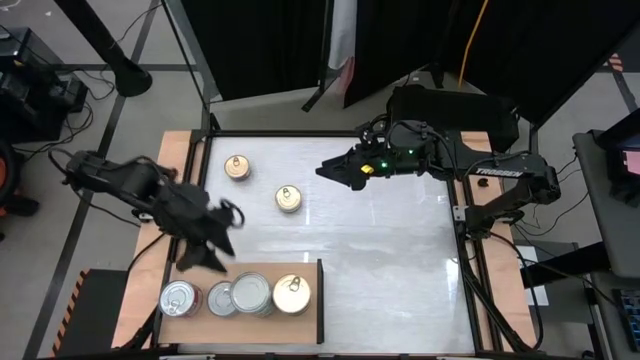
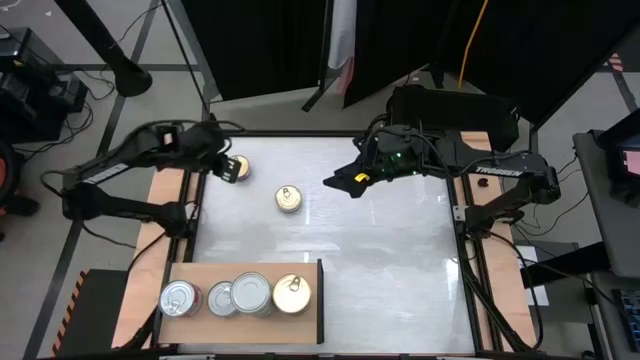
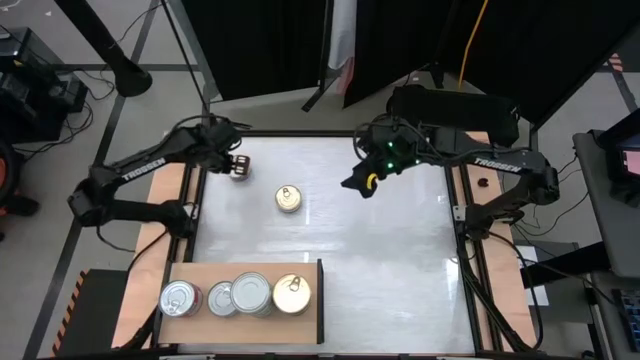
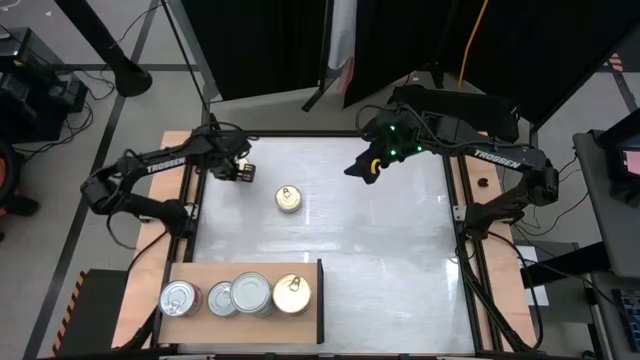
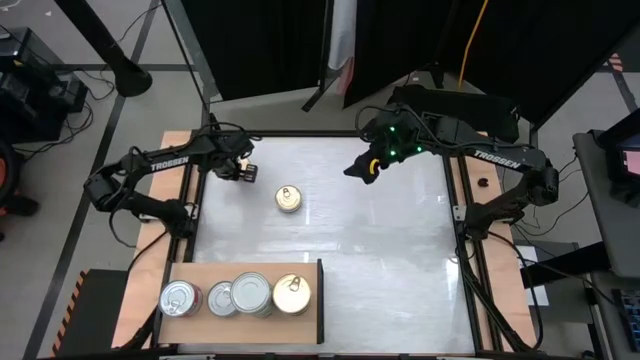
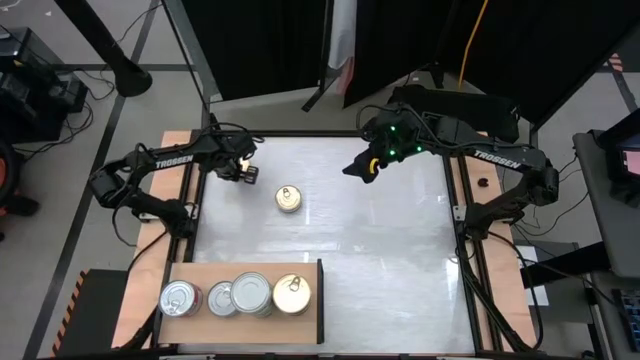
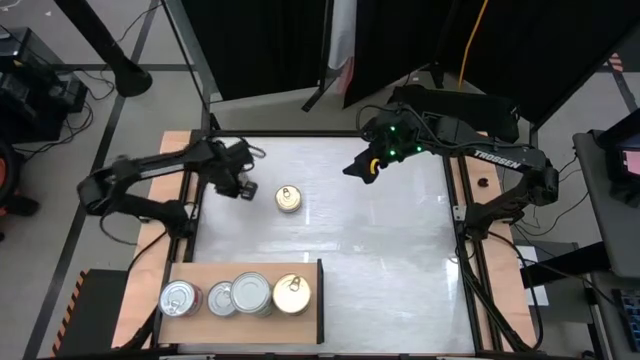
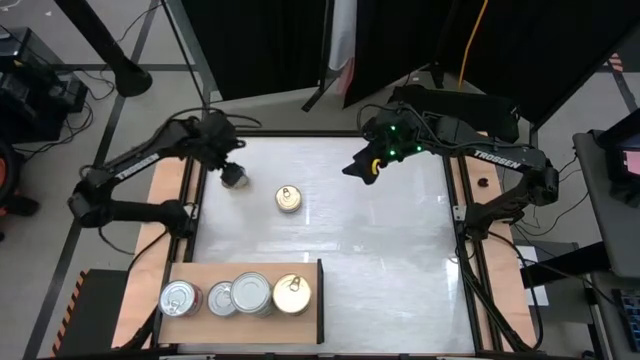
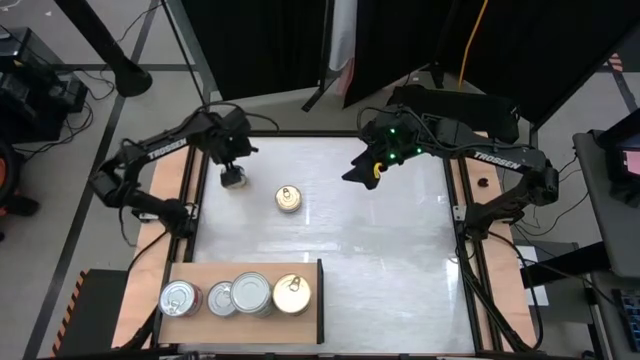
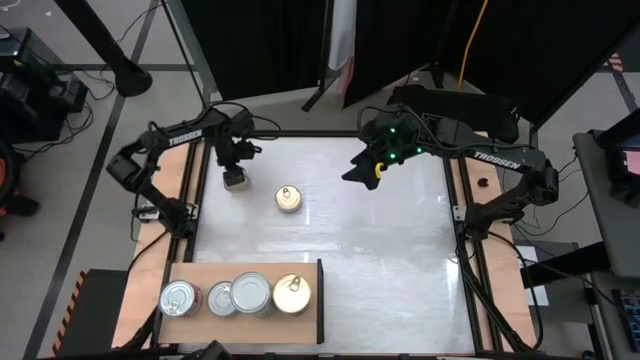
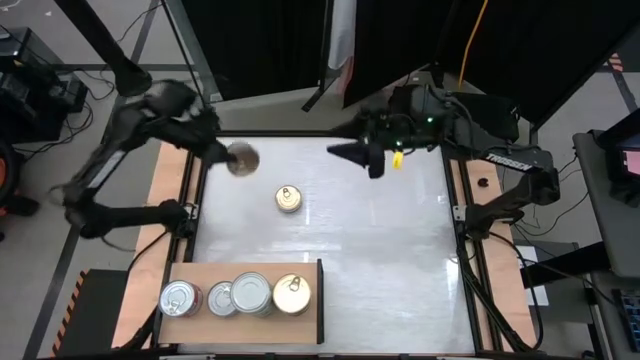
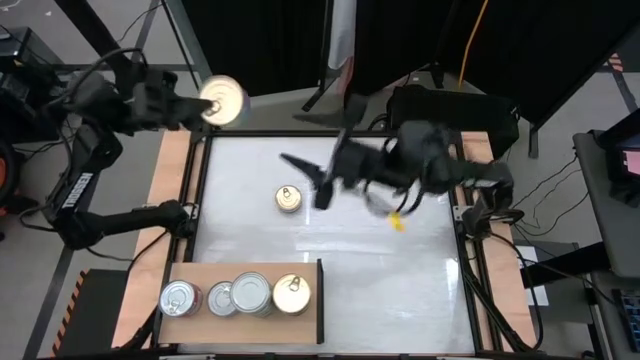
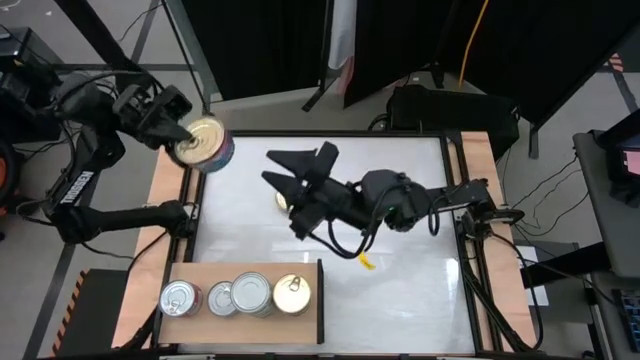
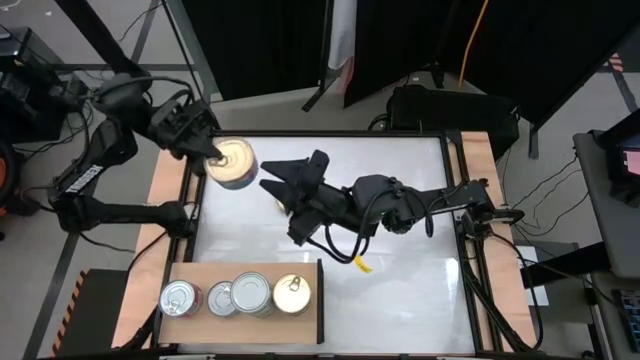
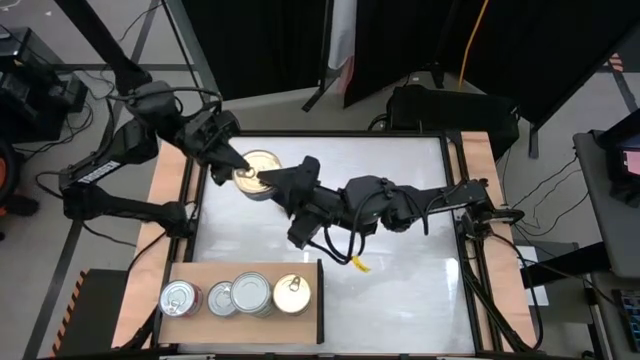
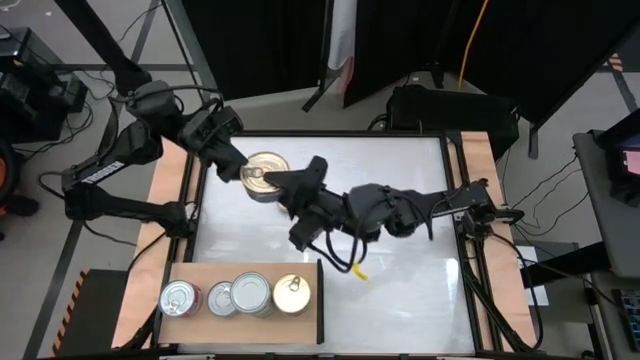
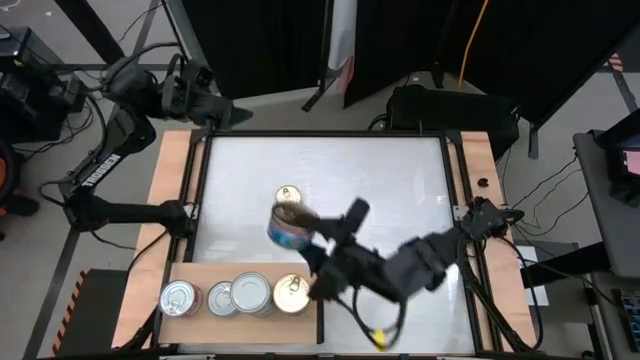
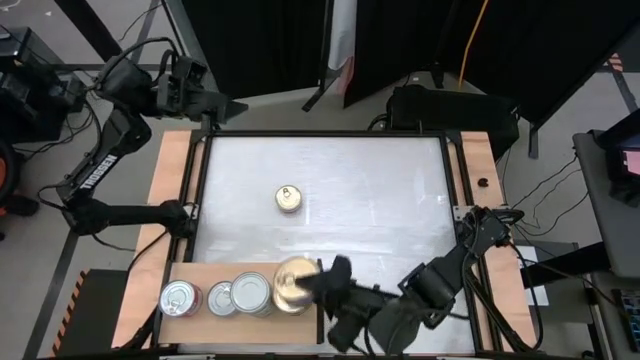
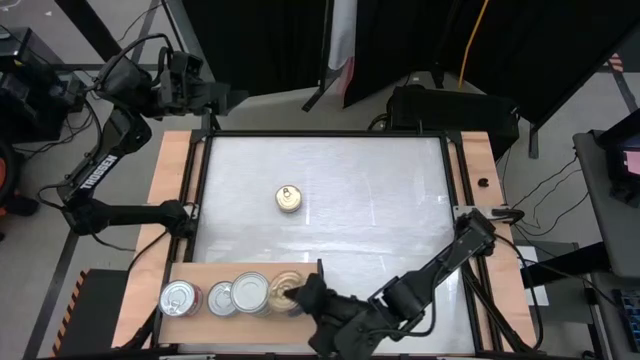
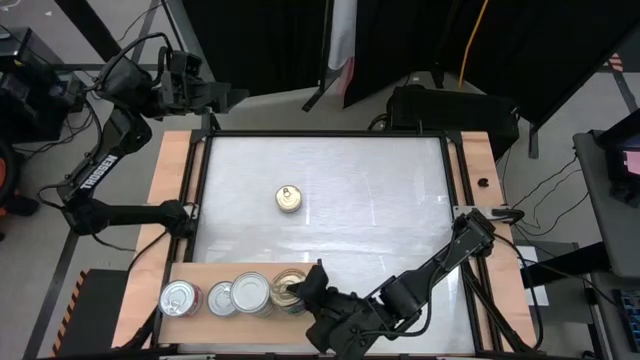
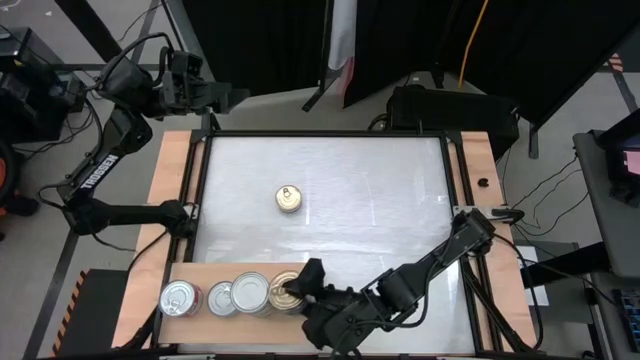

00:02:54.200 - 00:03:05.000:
Task: Stack canned seafood by type on shelf
Stack the blue pink tuna can on top of the other blue pink tuna cans on the shelf

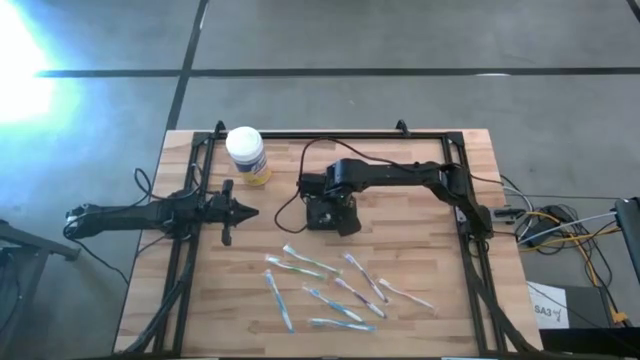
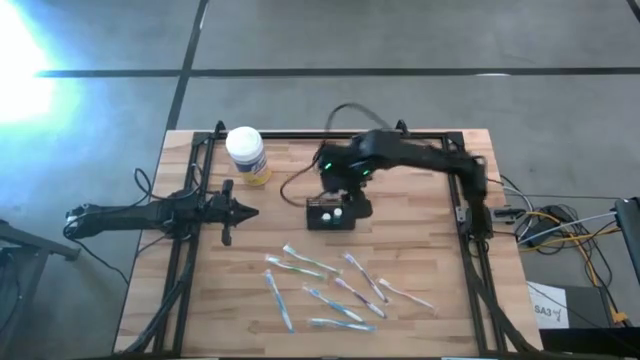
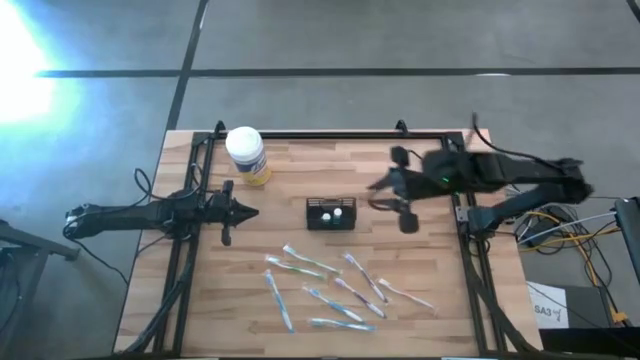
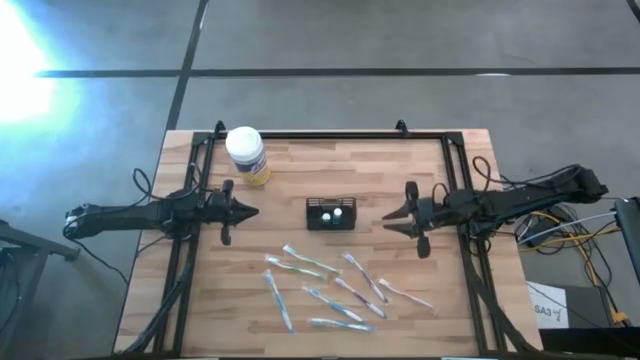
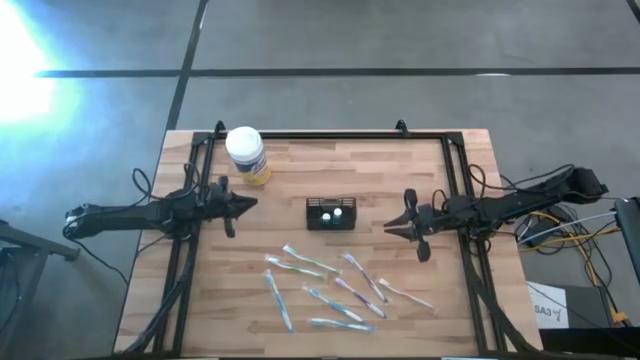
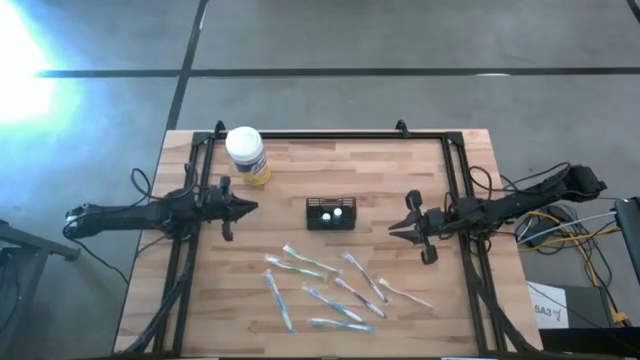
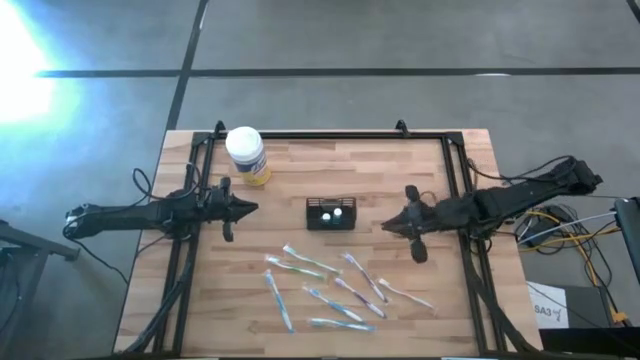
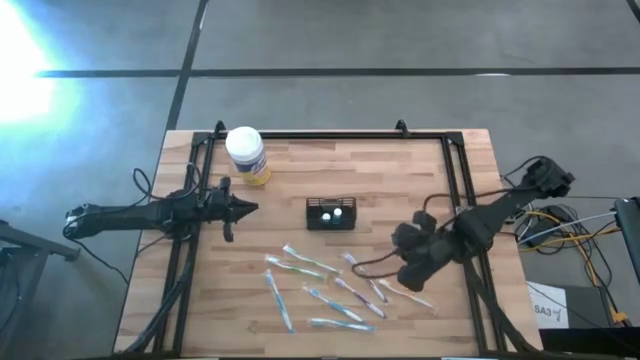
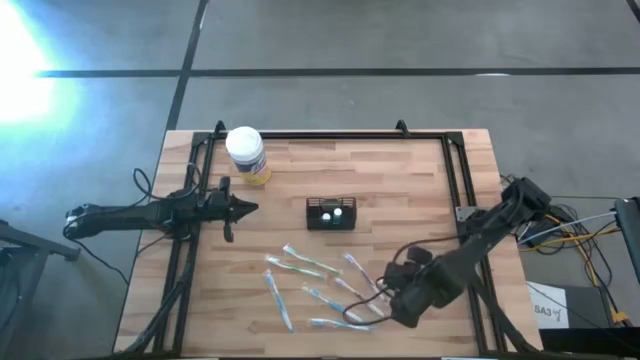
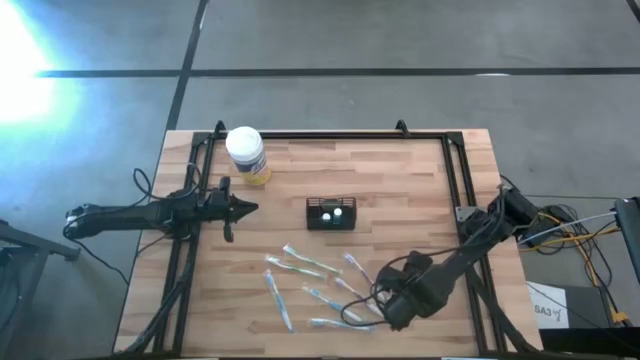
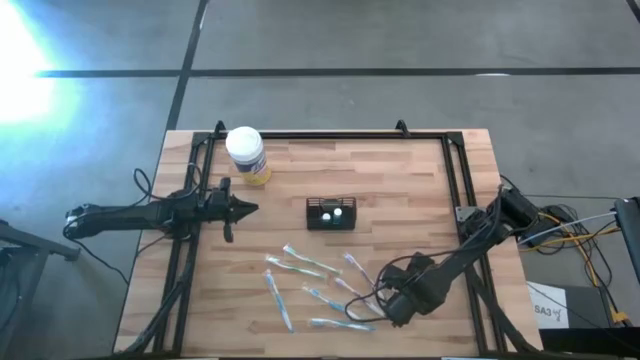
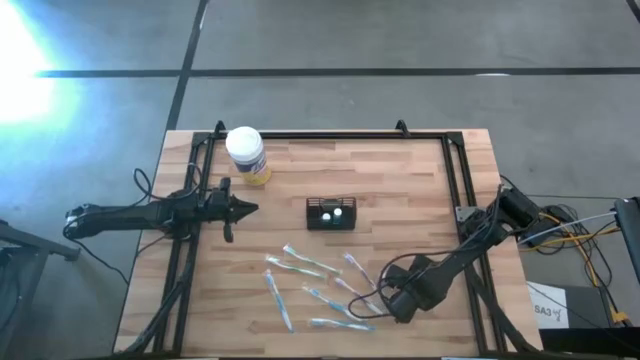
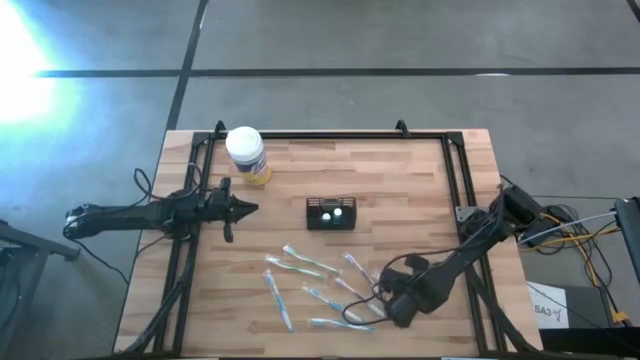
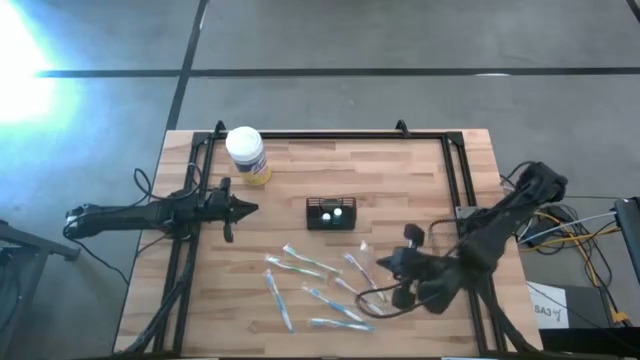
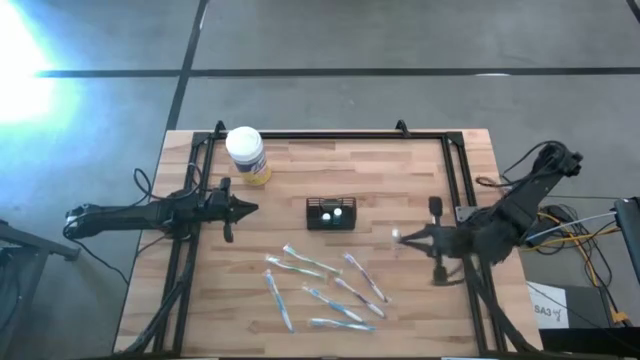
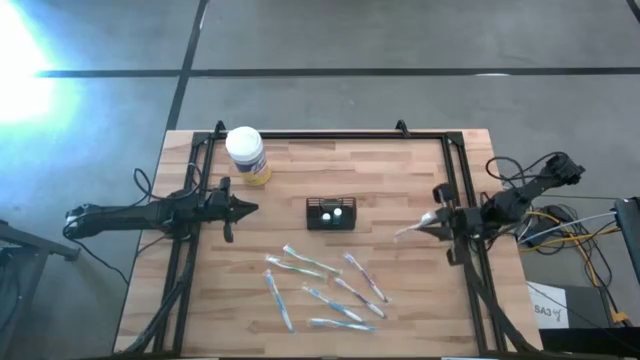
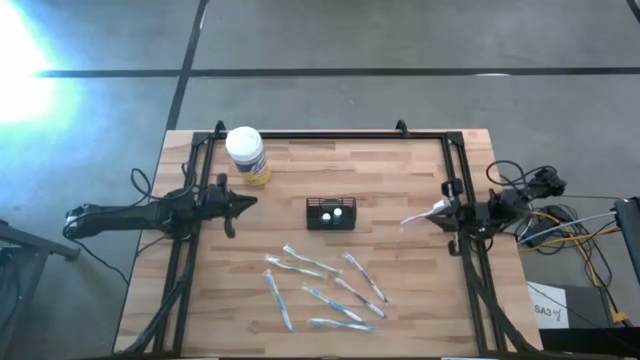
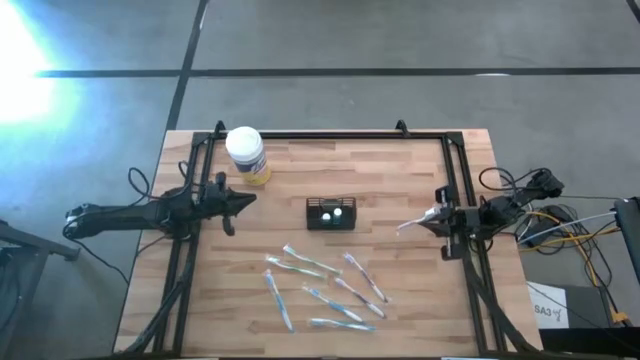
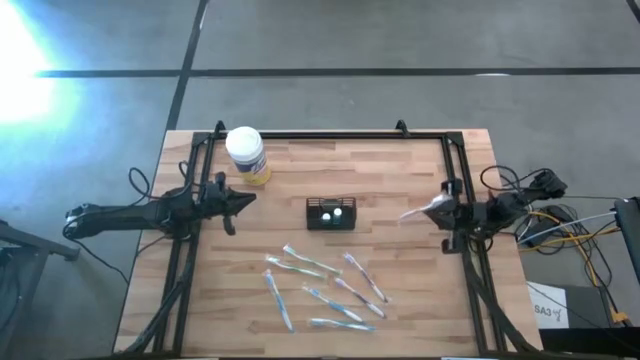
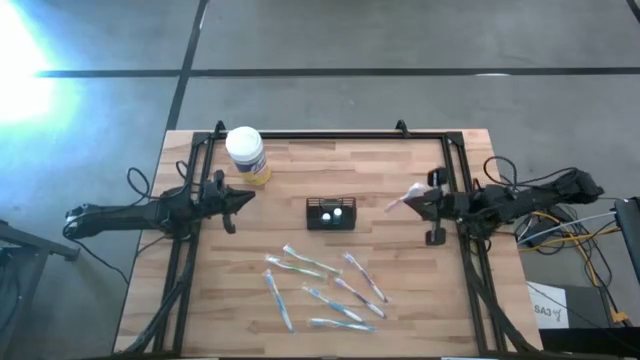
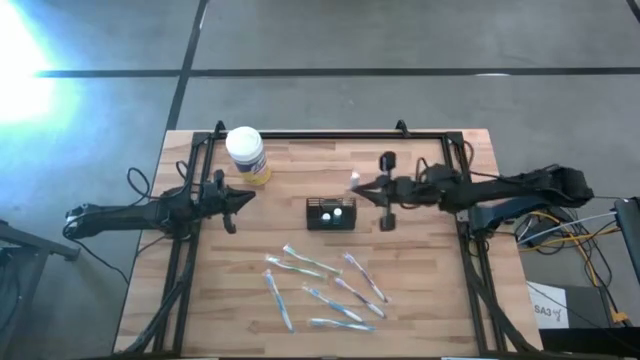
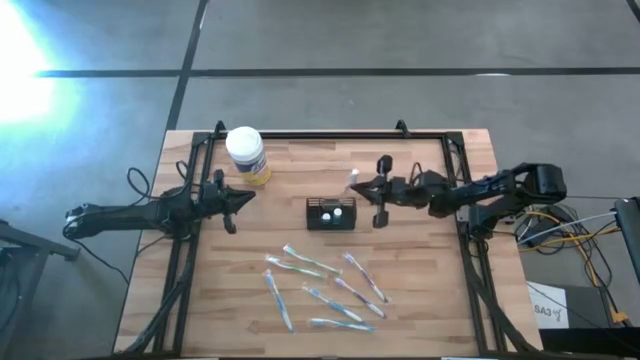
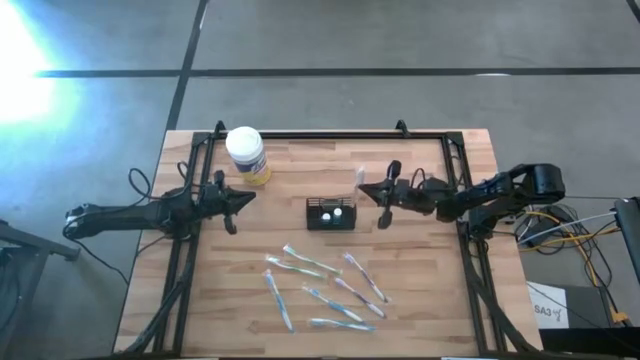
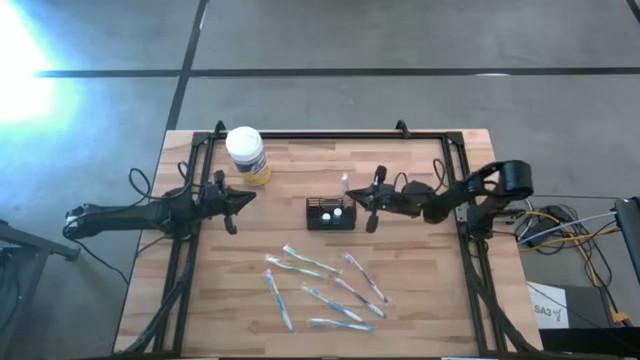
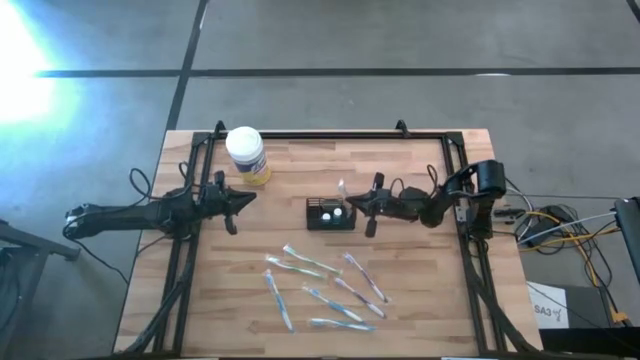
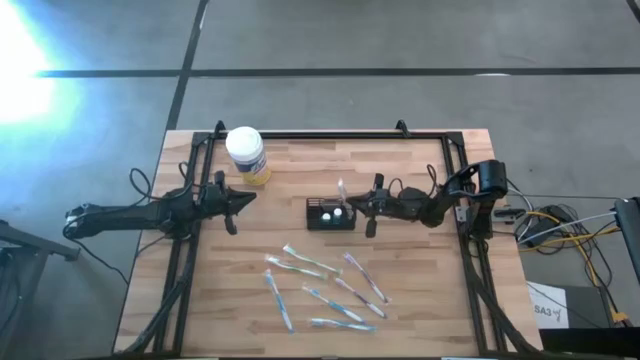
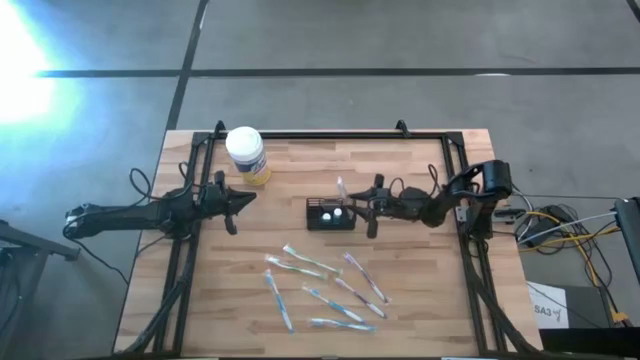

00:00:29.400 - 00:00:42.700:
Task: Pick & Place toothbrushing station
Put the orange toothbrush into the wire organizer
